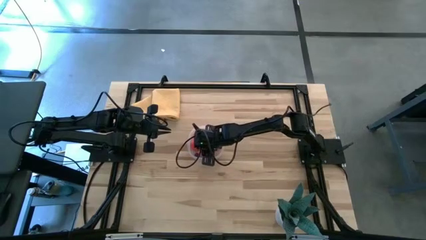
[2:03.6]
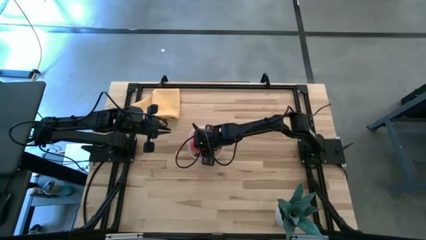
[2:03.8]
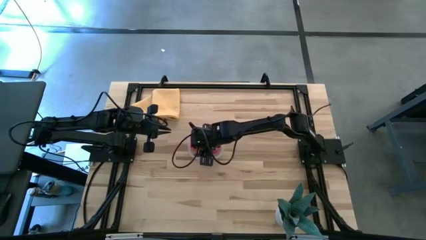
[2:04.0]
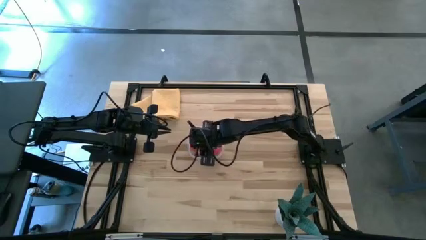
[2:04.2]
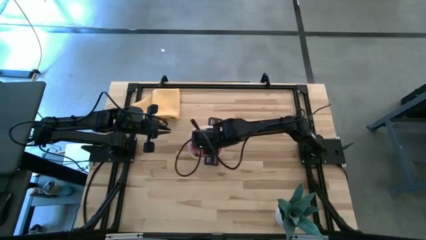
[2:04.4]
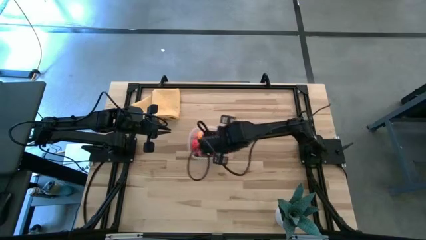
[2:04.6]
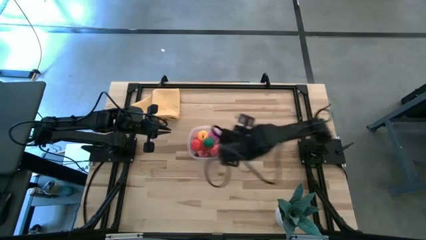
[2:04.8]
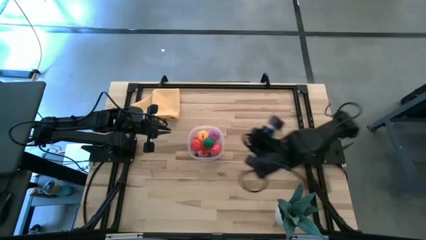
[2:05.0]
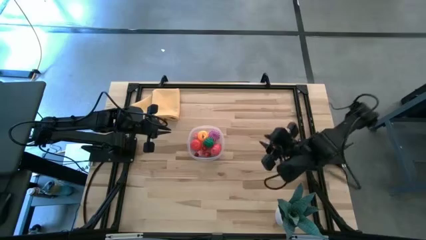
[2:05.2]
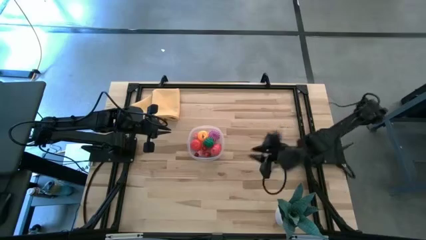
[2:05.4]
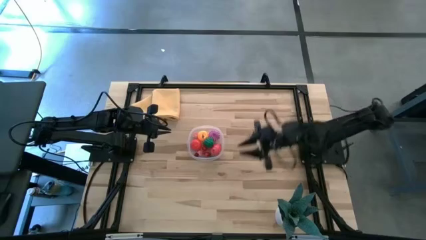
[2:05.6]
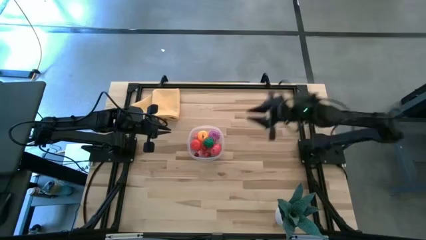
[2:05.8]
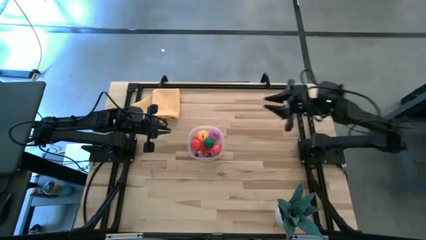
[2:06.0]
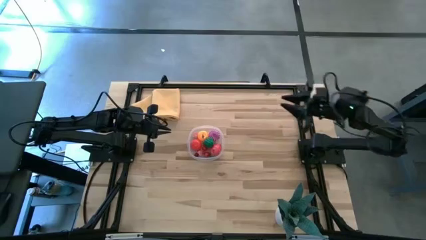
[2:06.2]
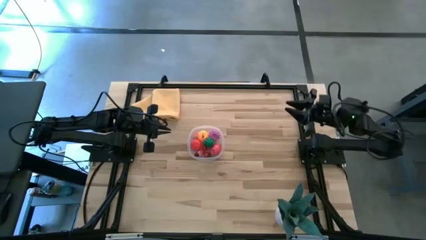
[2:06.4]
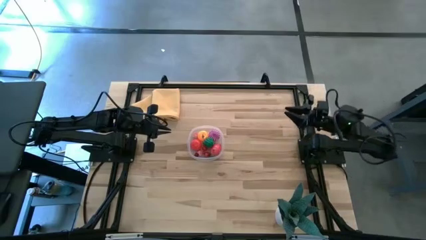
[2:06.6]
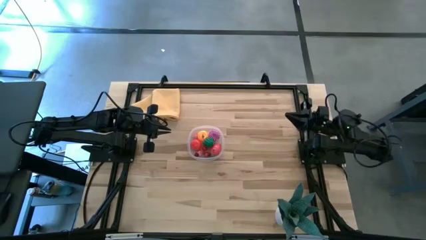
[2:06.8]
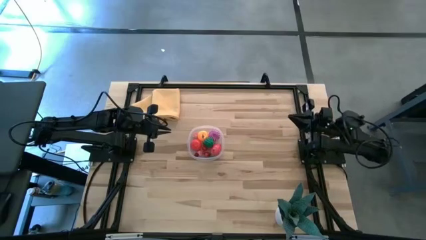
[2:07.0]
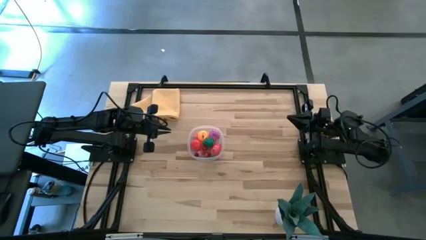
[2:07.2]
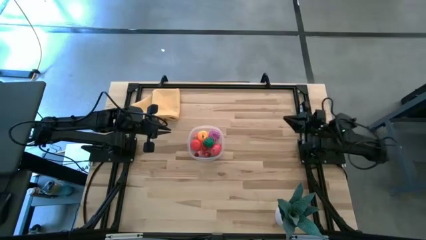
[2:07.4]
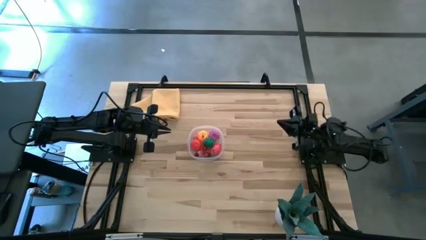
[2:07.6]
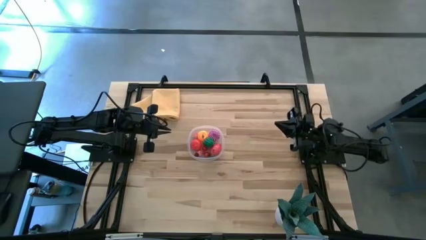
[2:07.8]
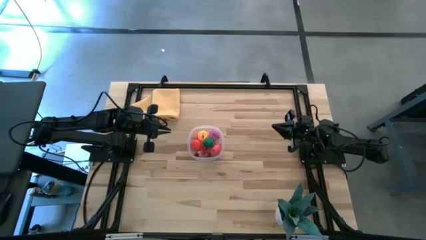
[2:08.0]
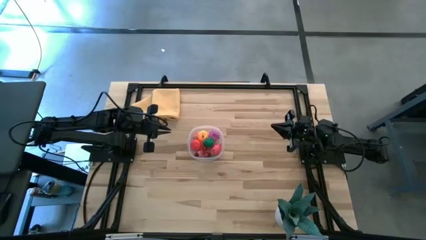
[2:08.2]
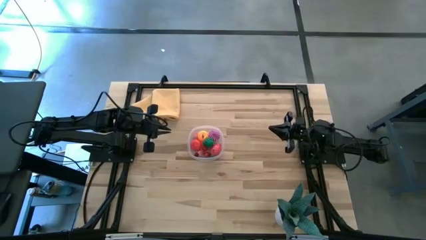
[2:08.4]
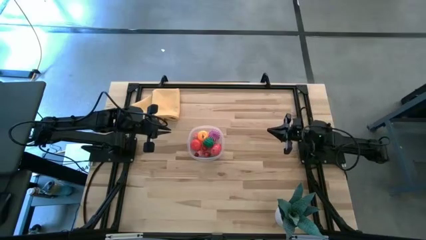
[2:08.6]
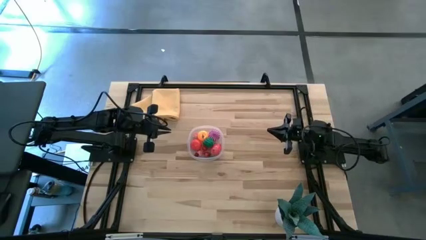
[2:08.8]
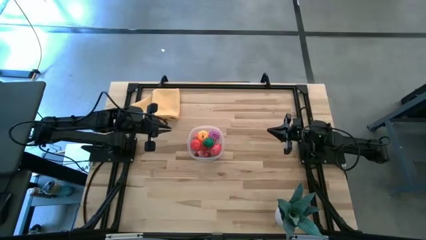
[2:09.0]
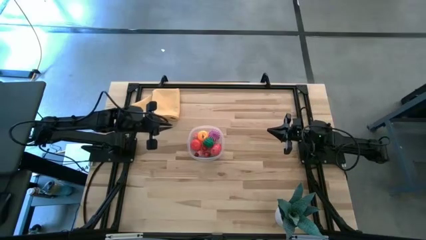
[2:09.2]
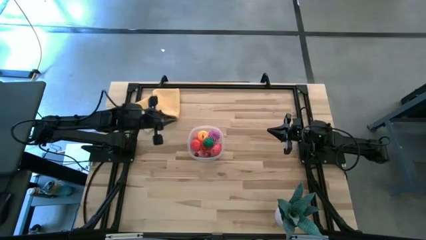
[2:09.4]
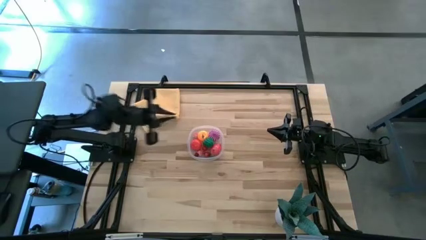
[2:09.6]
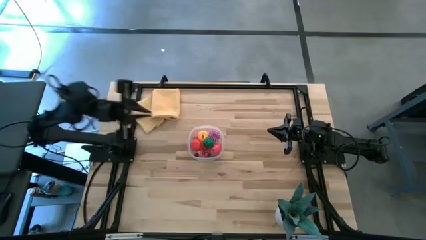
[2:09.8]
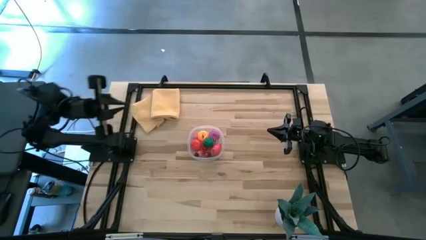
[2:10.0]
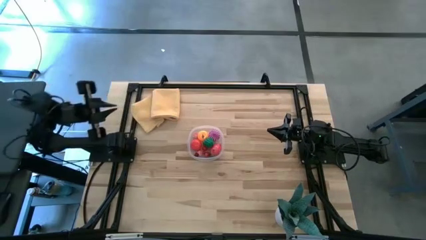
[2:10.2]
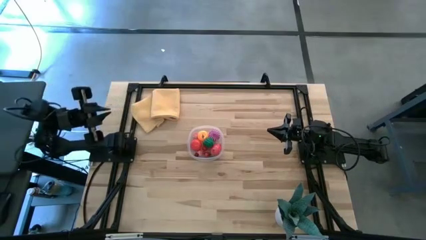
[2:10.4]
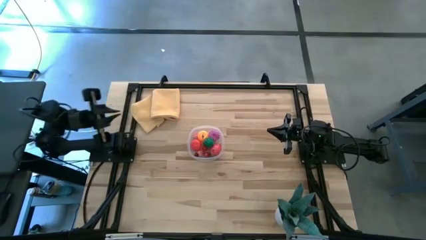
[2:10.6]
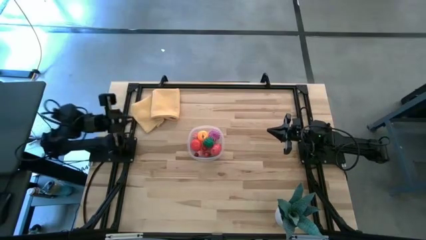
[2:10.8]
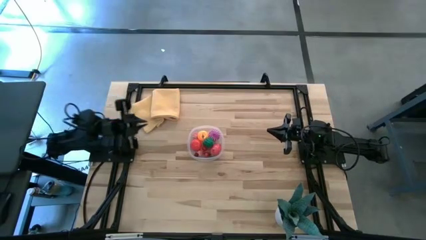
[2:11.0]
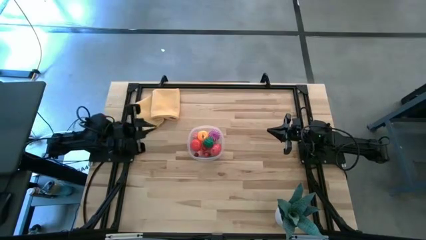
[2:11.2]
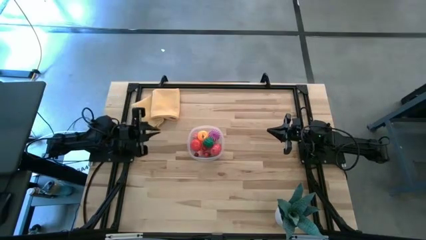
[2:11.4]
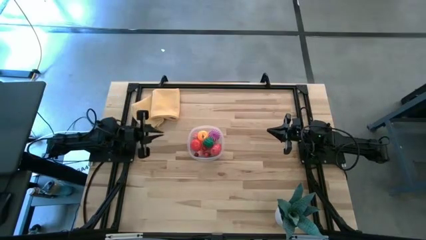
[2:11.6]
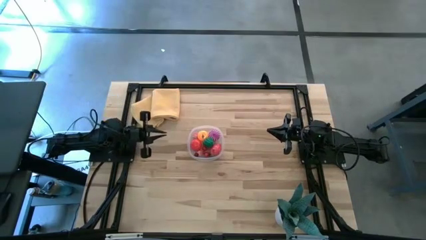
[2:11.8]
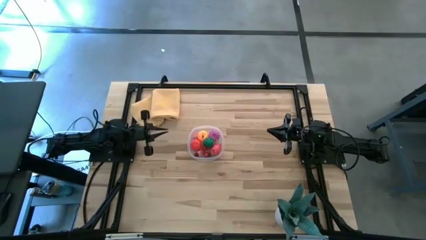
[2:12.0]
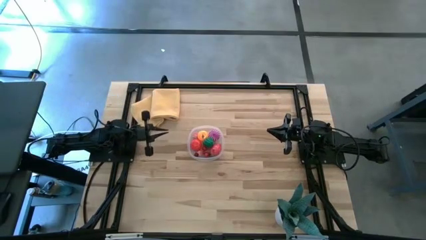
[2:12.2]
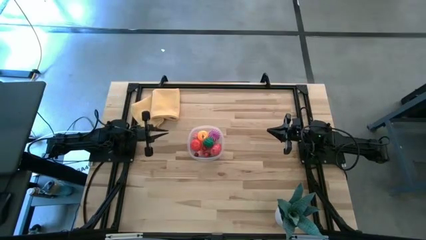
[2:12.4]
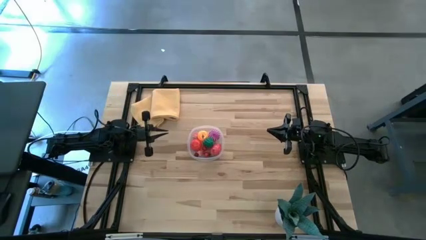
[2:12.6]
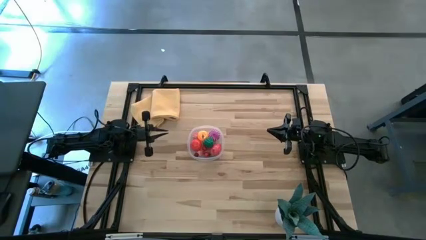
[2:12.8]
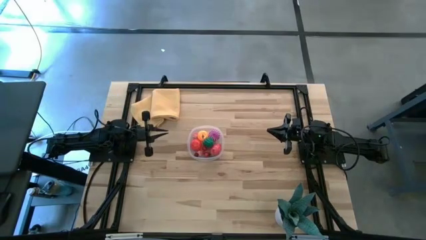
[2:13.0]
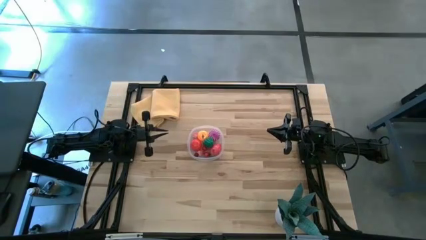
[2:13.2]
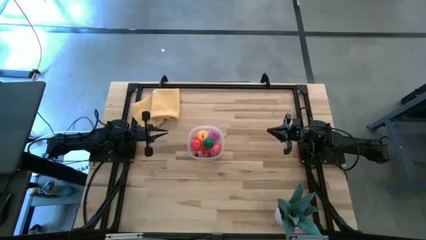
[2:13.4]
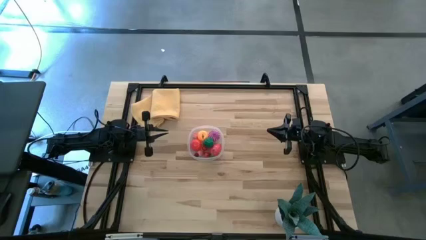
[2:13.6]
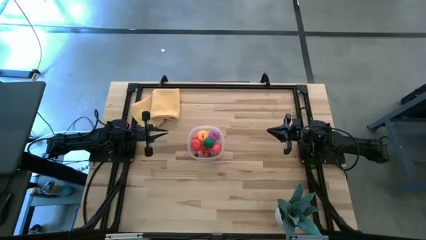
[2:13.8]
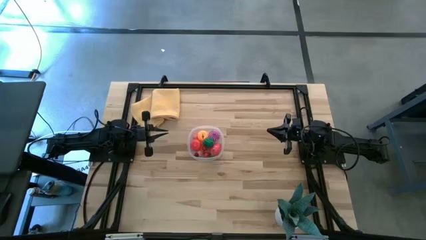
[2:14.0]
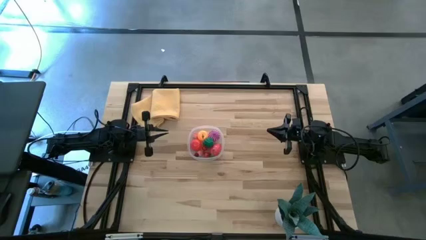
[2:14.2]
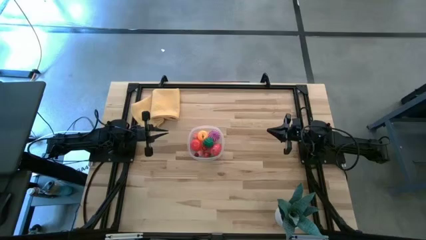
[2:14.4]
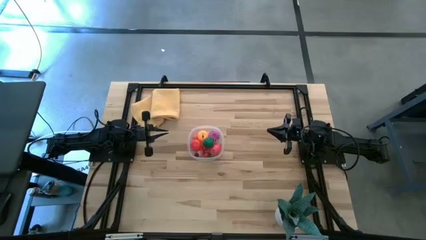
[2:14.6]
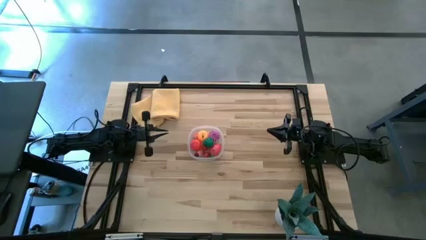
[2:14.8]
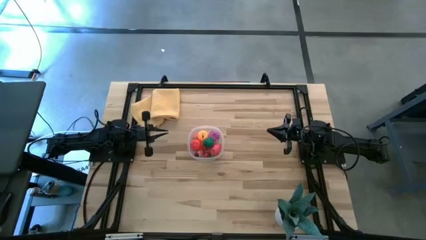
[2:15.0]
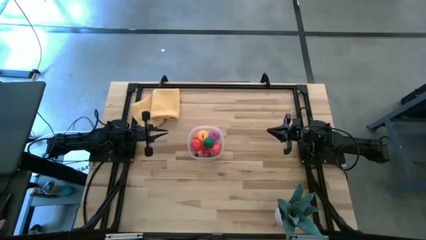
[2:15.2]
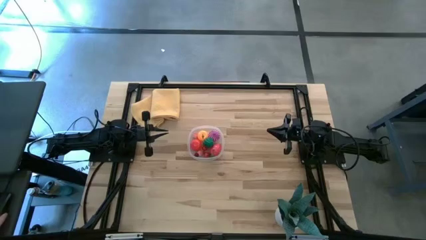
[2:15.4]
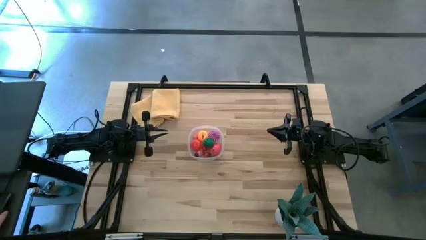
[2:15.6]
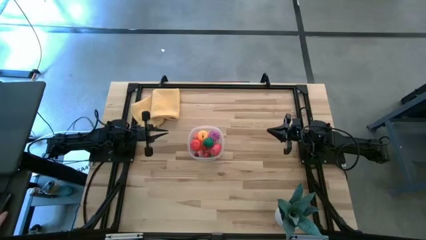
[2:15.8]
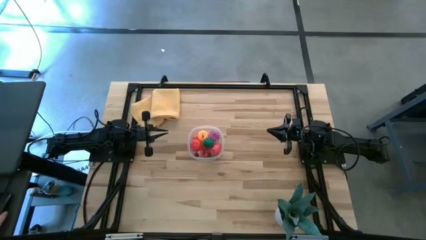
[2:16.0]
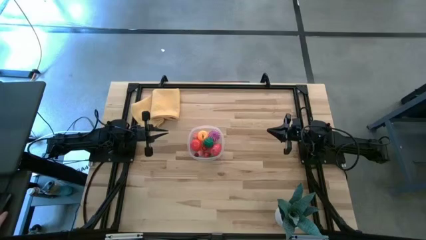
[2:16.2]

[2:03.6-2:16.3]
Task: Pick and placing Produce into tupperware
Return to Home Position
